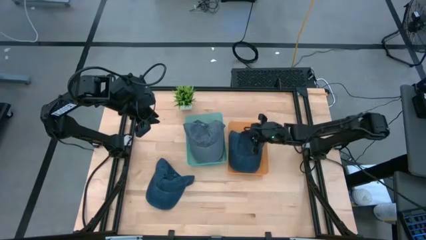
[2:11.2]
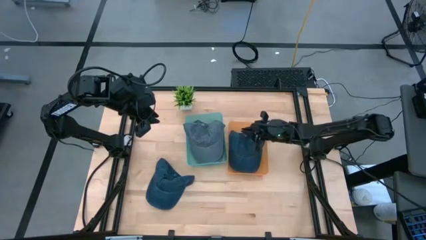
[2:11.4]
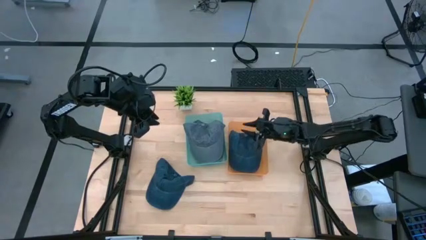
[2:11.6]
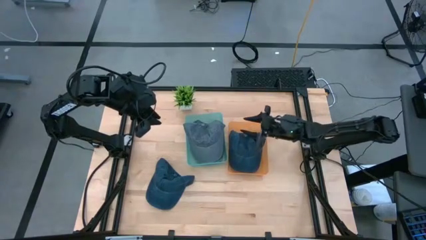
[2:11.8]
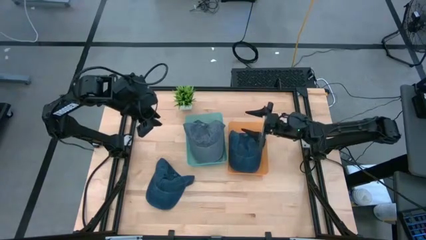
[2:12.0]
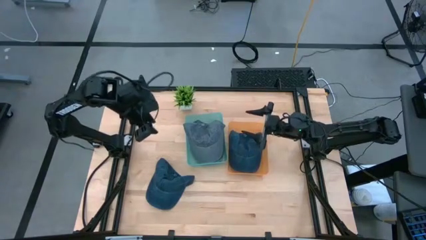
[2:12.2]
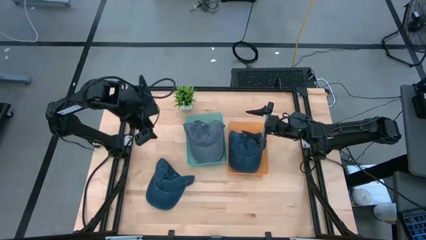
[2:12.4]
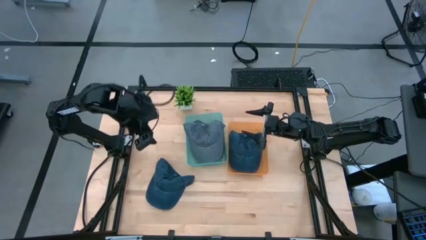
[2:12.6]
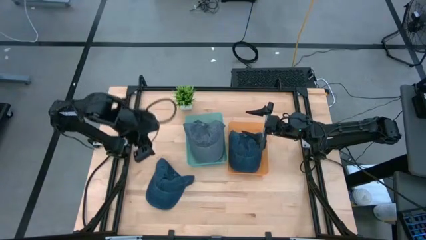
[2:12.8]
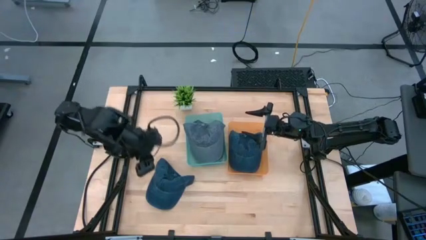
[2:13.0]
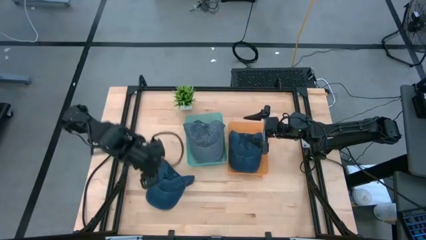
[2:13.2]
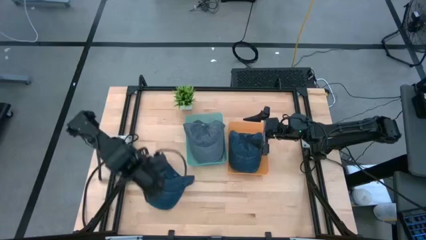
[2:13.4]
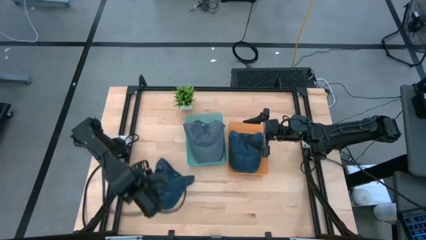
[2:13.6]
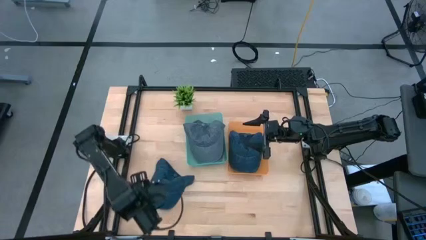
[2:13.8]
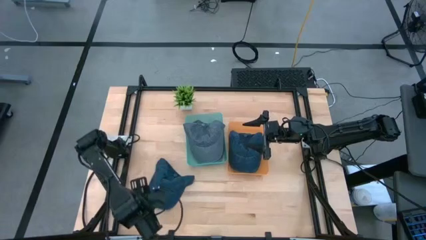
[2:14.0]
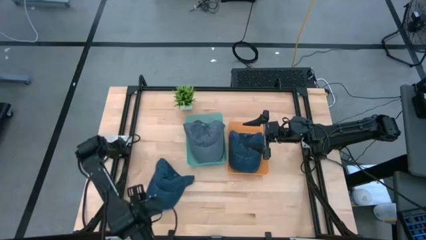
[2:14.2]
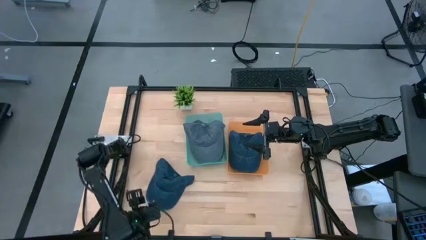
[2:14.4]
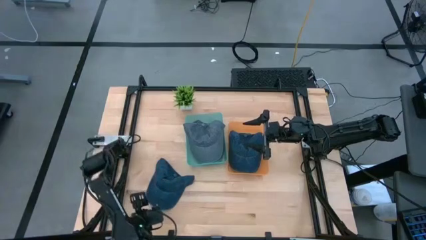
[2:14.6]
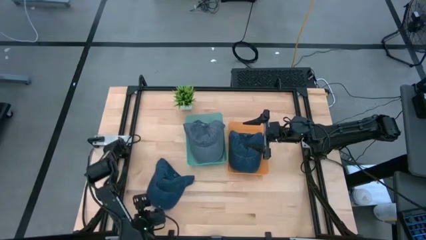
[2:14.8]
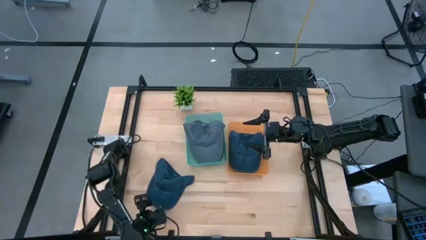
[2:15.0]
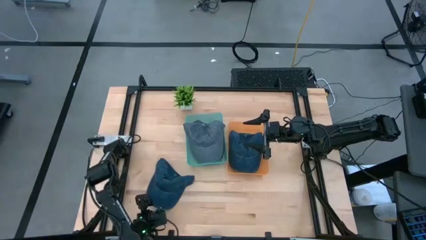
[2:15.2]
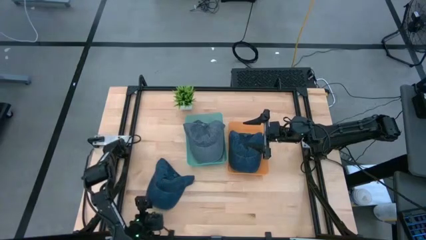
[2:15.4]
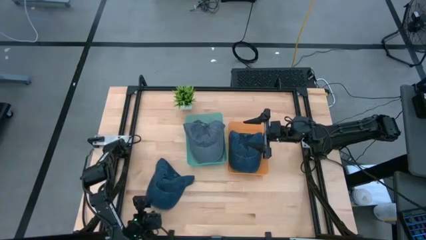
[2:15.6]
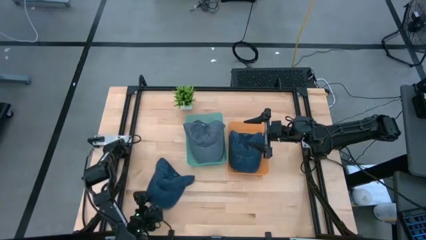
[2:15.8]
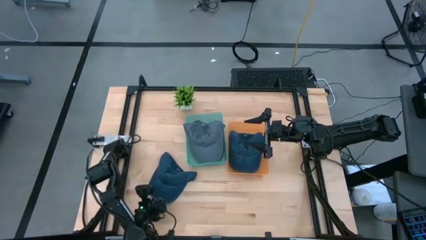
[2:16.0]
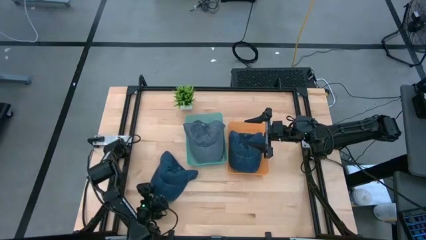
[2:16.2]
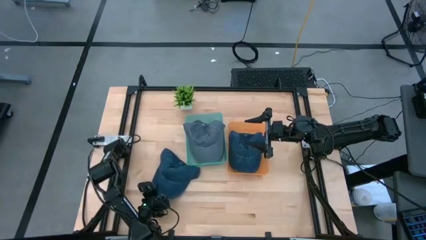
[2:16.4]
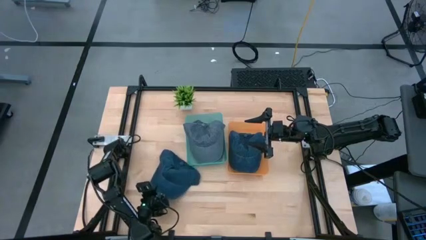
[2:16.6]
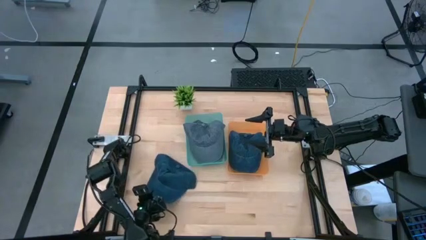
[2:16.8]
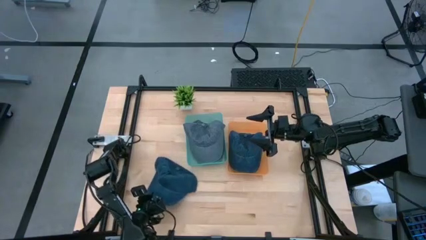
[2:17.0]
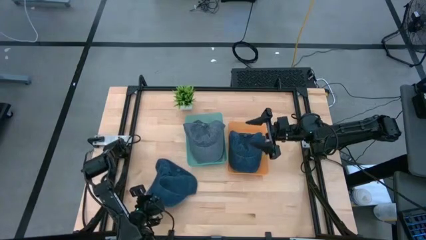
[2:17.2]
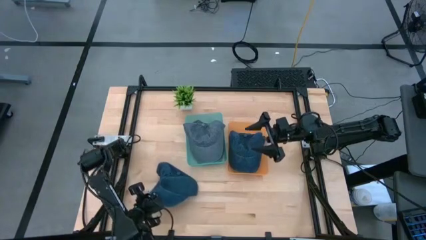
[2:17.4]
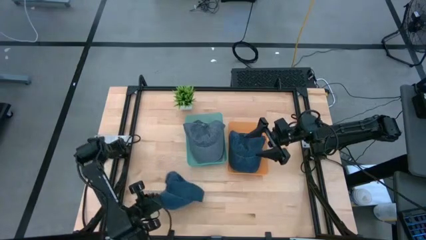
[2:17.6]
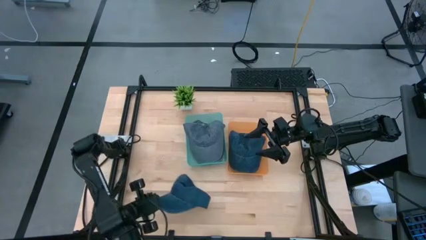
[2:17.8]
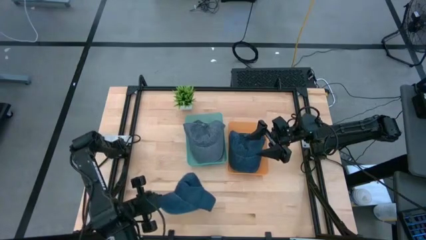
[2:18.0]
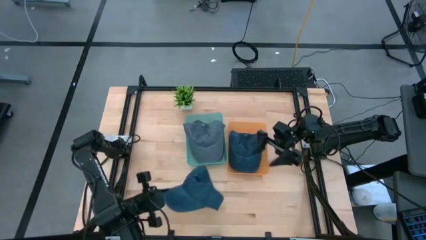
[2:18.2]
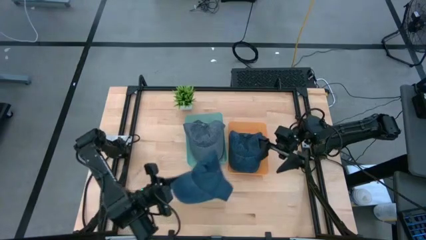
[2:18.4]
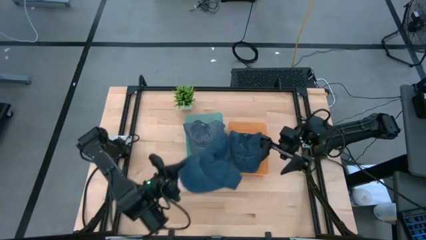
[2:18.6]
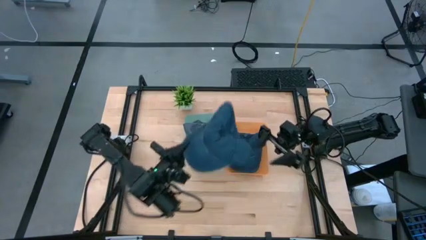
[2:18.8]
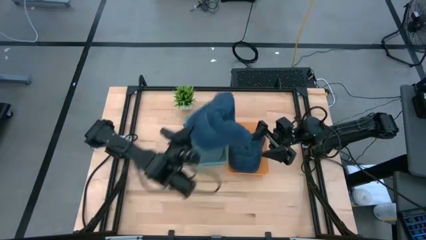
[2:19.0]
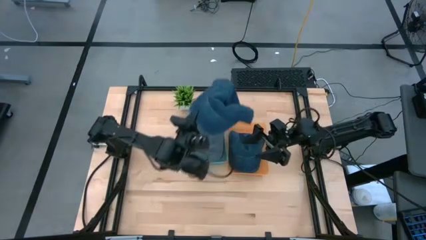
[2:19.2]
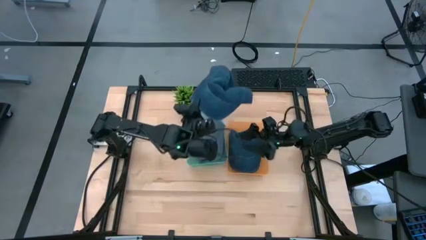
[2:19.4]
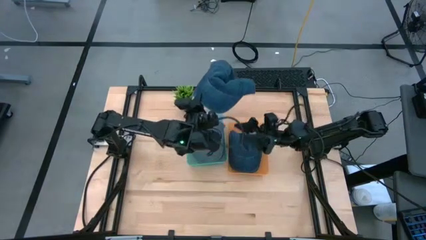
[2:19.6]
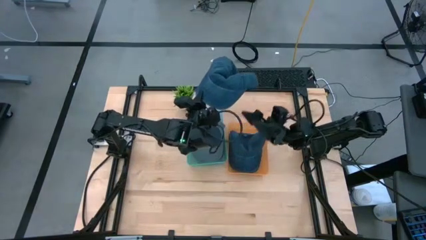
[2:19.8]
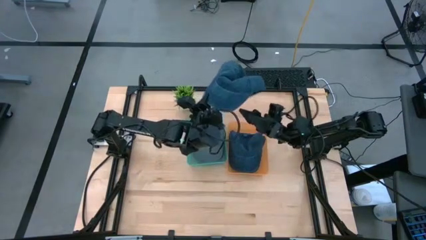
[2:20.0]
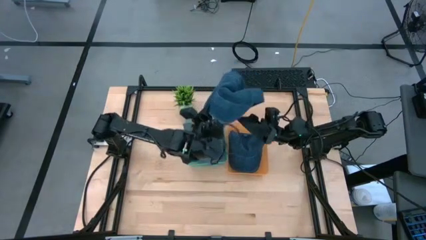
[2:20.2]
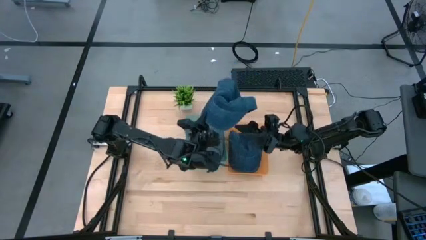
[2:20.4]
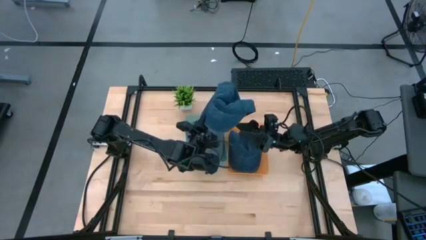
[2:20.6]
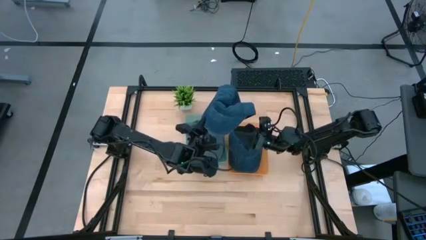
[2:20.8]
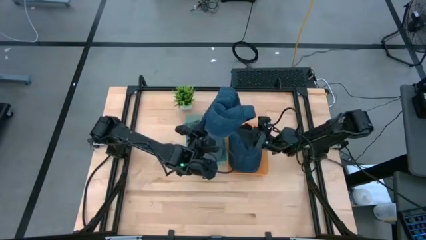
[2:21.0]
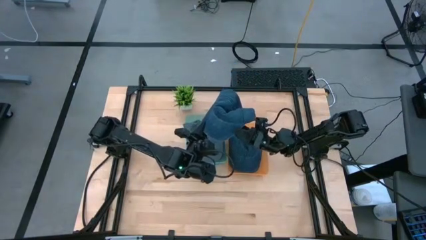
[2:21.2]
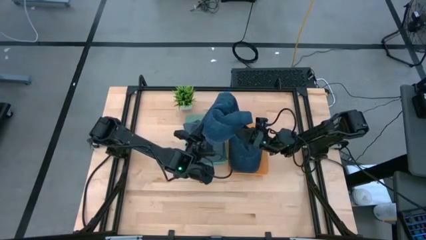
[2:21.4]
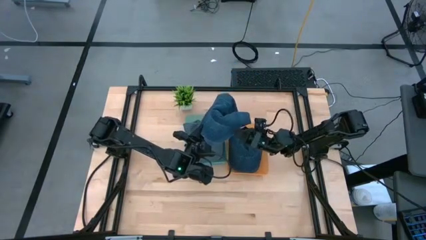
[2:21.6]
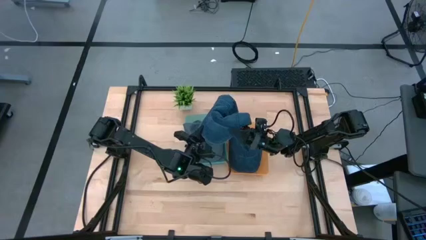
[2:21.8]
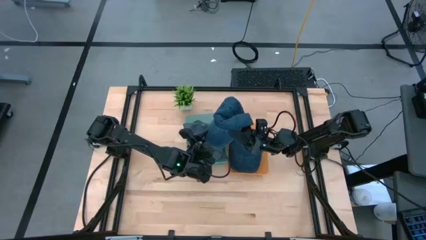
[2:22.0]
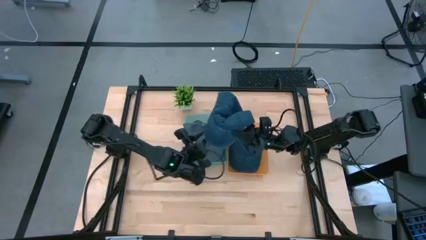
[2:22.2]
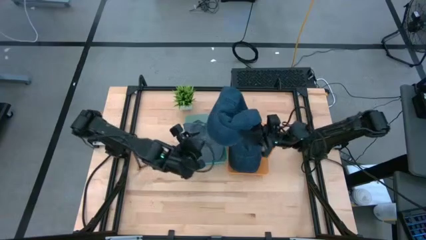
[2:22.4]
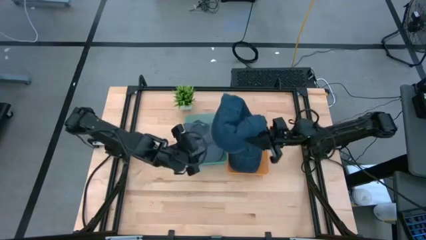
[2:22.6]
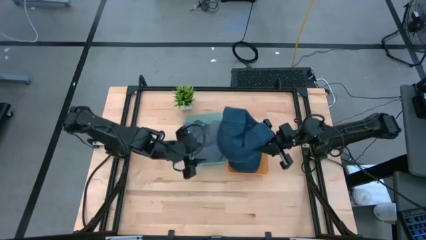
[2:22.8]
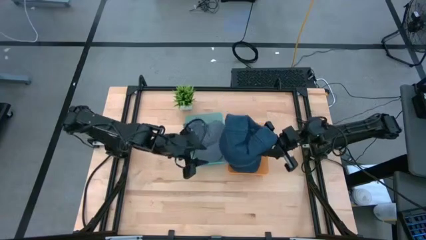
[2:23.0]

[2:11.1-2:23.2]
Task: Pick & Place hat
Put the blue cap into the orange bin

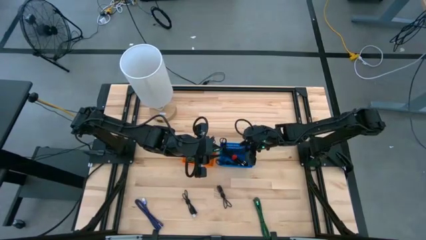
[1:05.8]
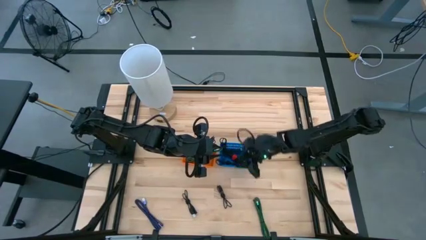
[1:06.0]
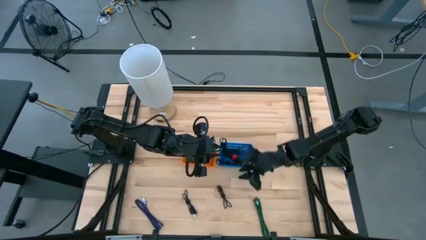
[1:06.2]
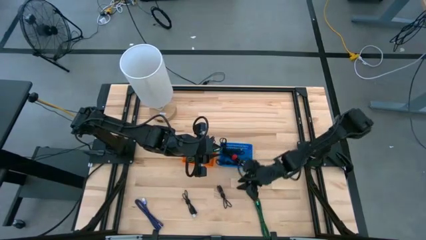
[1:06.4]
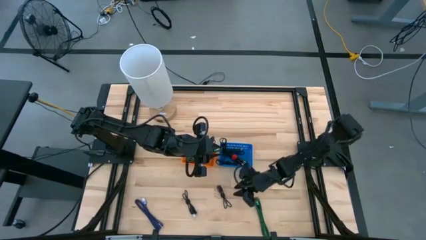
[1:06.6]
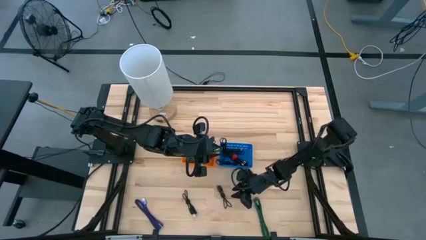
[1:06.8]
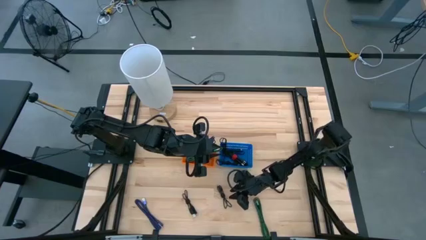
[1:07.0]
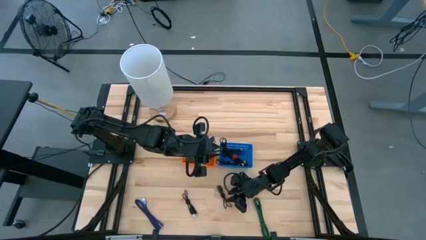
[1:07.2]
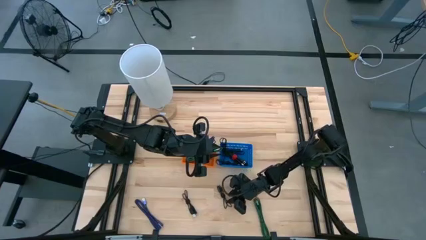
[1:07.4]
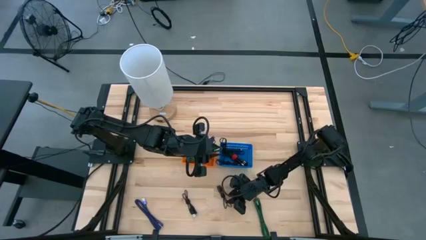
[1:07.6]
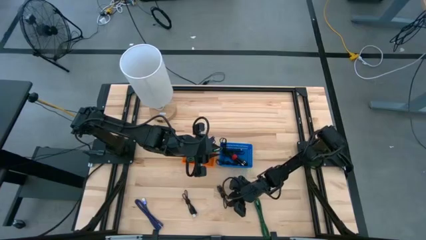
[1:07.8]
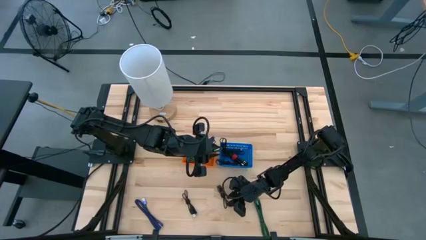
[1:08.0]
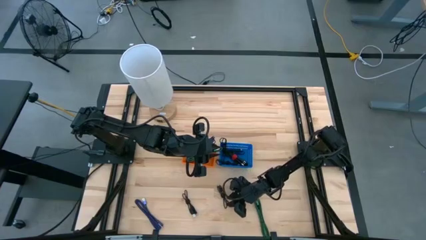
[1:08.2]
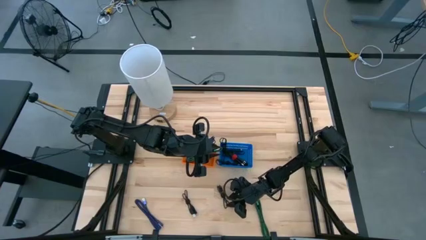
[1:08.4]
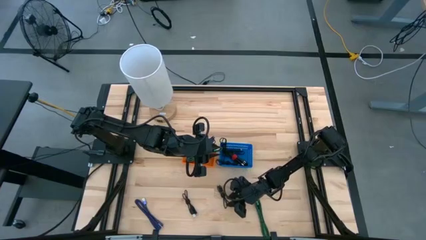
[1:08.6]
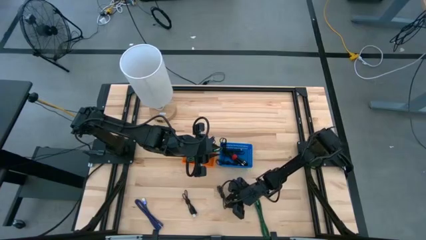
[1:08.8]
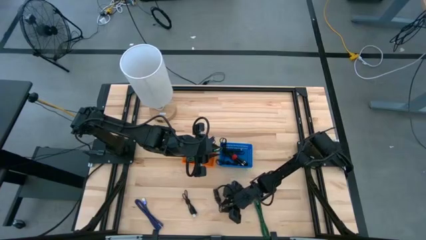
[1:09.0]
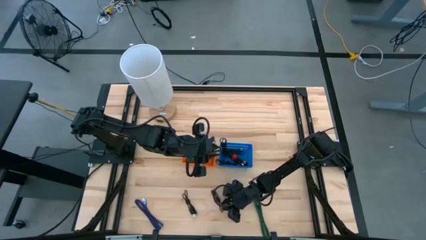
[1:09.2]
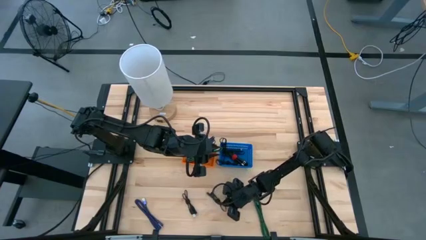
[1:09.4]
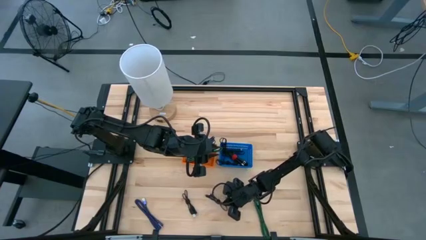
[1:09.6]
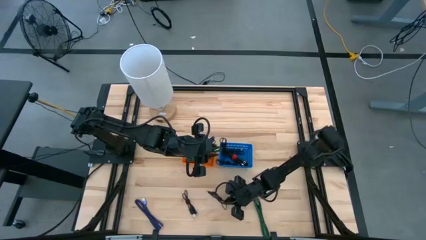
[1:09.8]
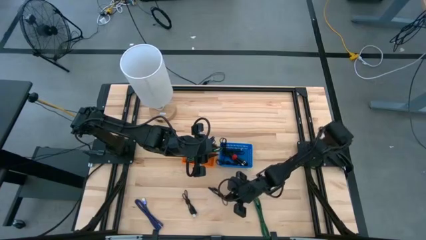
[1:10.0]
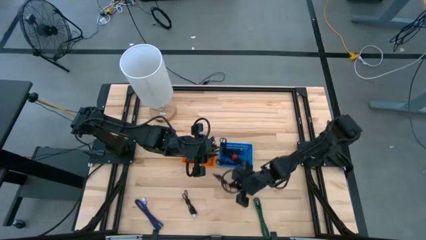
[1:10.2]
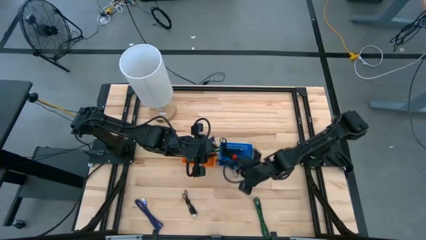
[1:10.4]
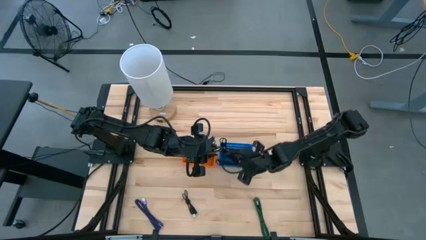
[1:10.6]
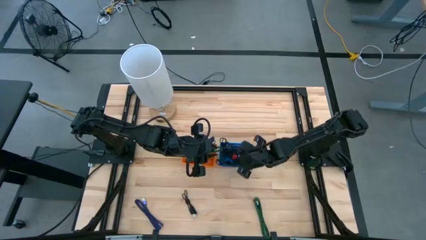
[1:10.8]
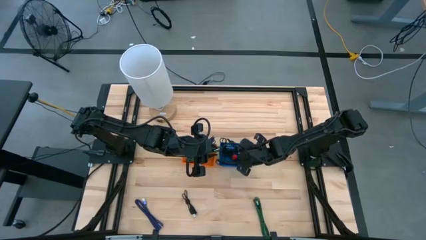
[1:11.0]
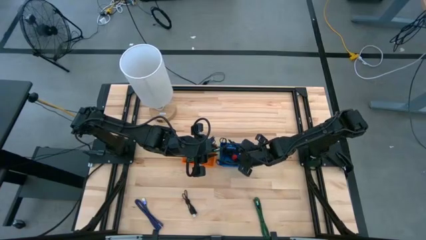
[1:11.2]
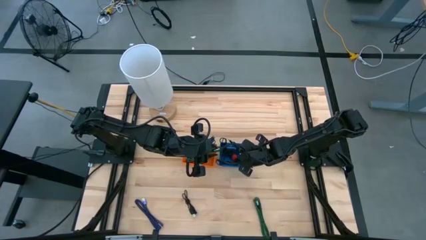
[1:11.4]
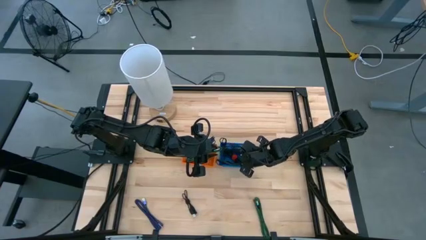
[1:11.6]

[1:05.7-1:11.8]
Task: Pick & Place USB Port
Put the black charger cable into the blue bin
